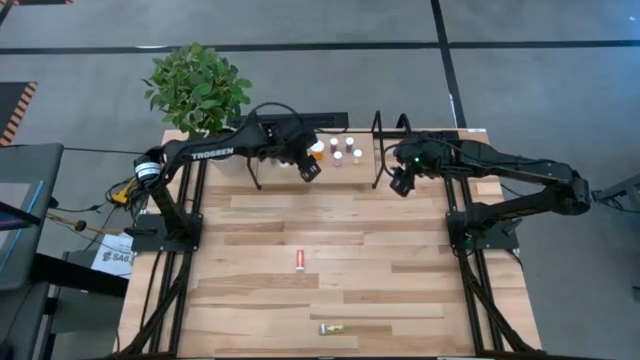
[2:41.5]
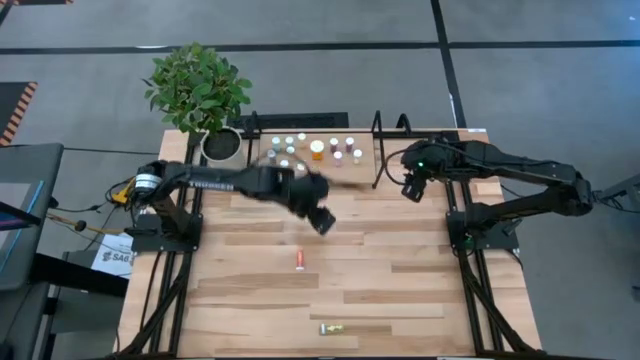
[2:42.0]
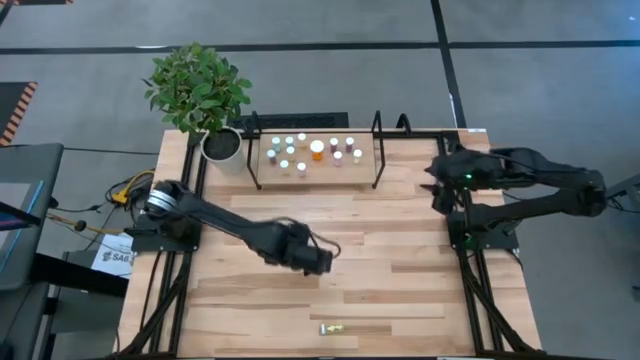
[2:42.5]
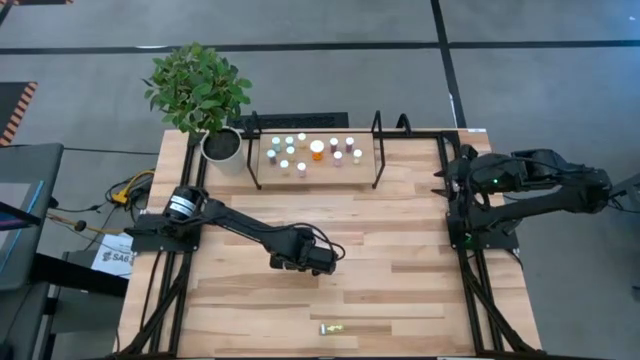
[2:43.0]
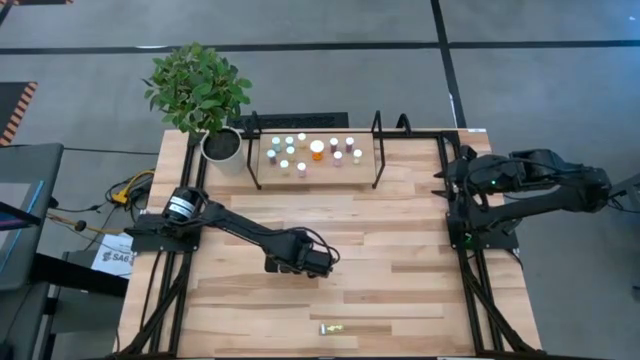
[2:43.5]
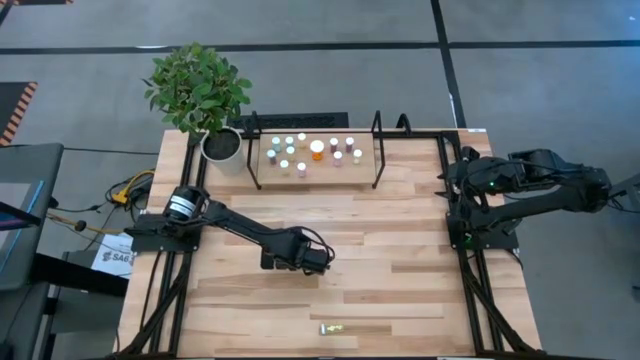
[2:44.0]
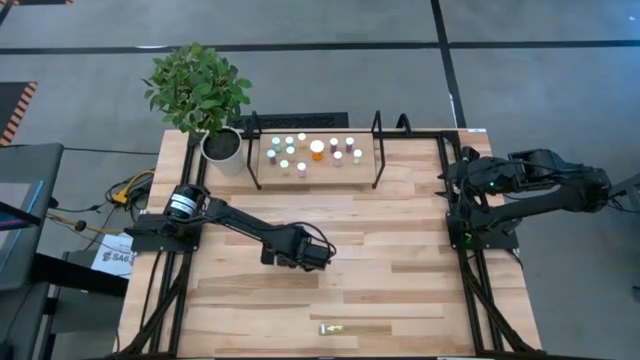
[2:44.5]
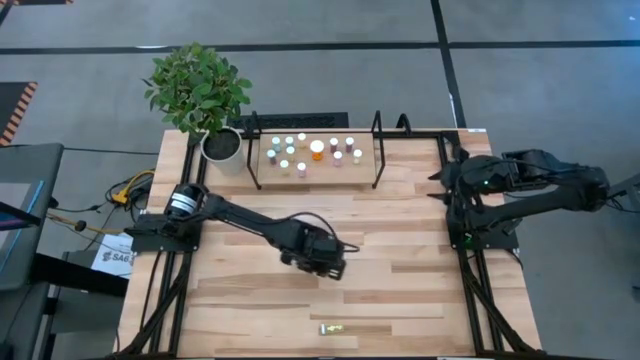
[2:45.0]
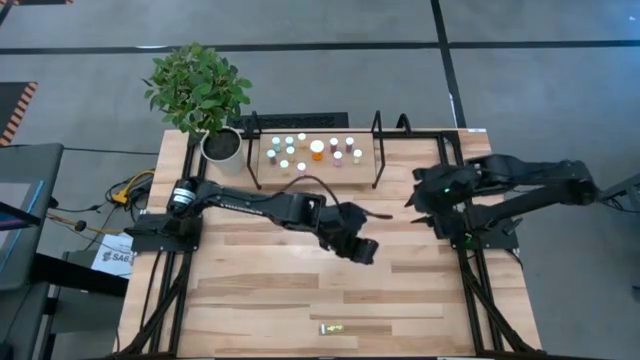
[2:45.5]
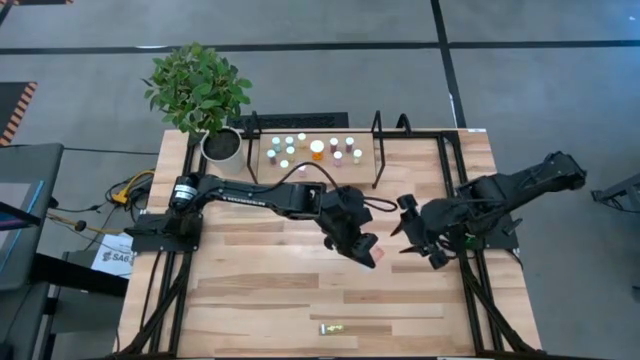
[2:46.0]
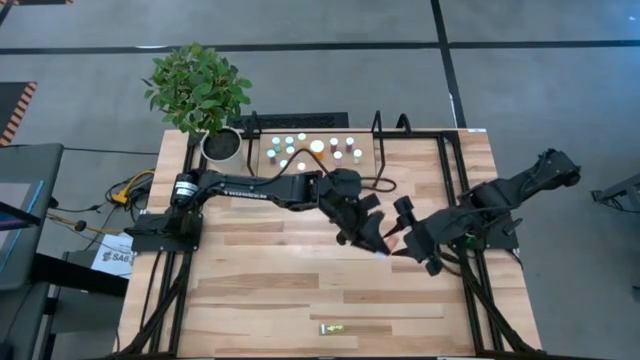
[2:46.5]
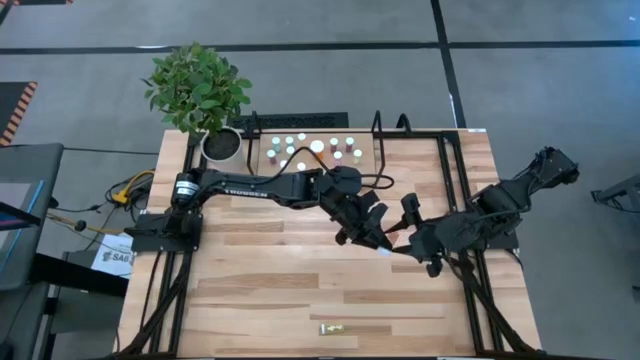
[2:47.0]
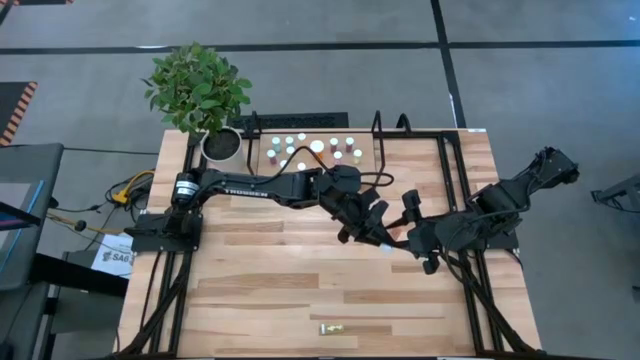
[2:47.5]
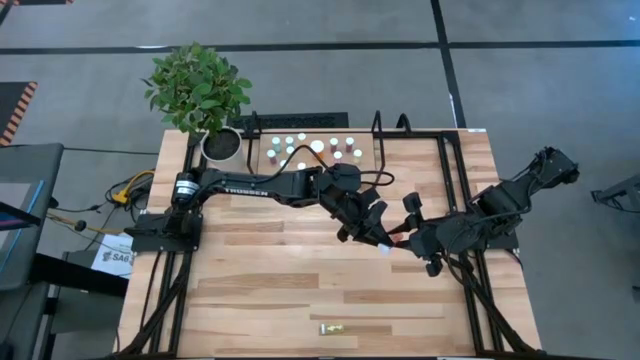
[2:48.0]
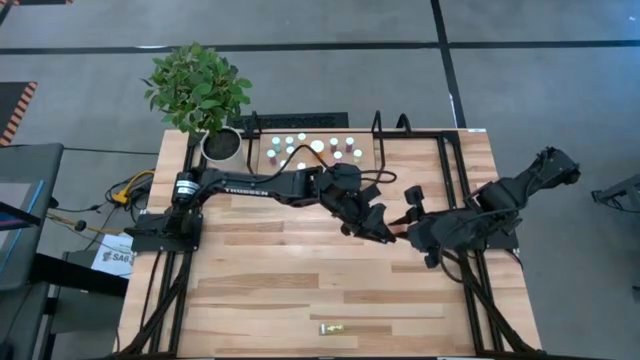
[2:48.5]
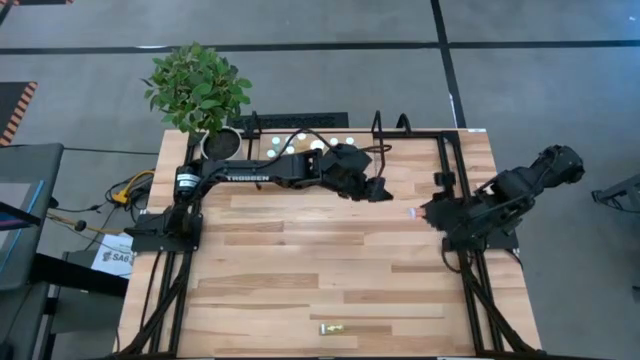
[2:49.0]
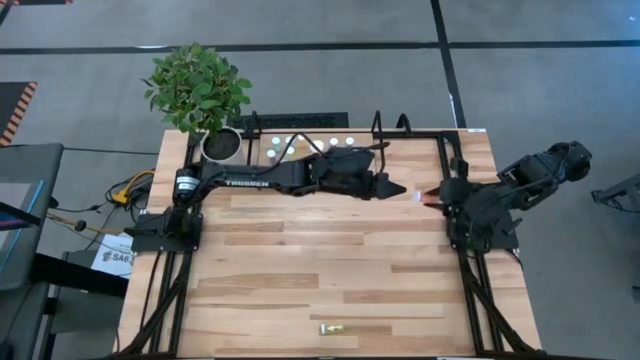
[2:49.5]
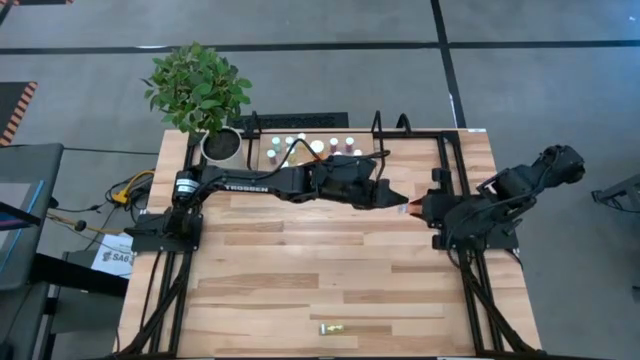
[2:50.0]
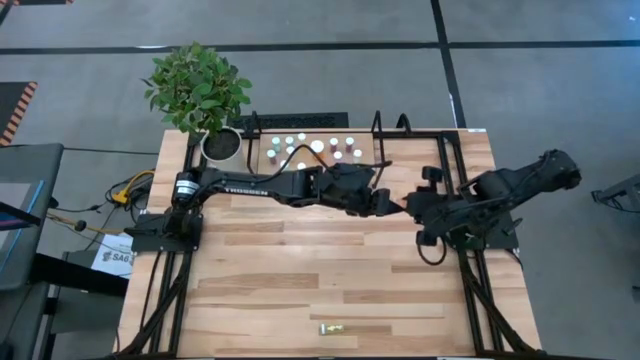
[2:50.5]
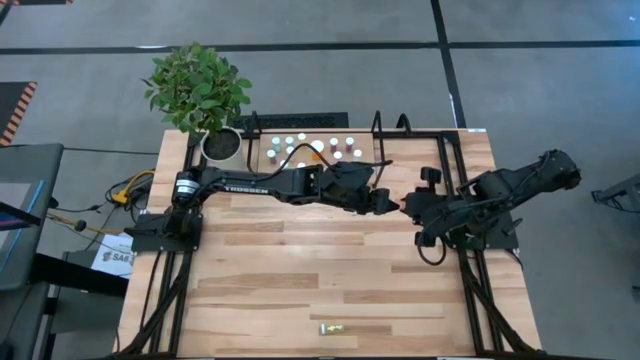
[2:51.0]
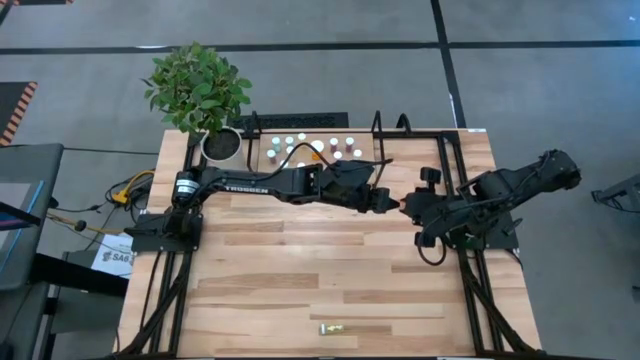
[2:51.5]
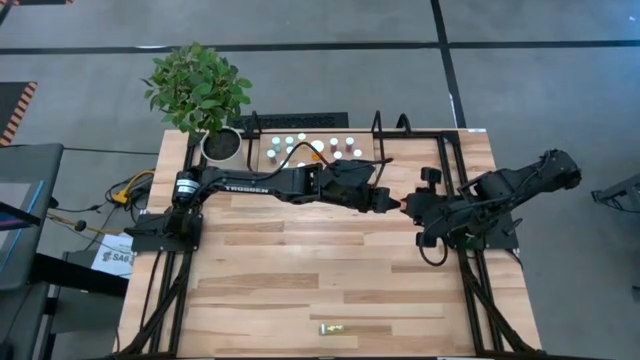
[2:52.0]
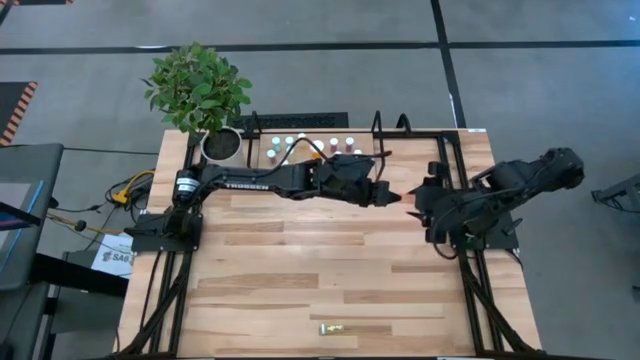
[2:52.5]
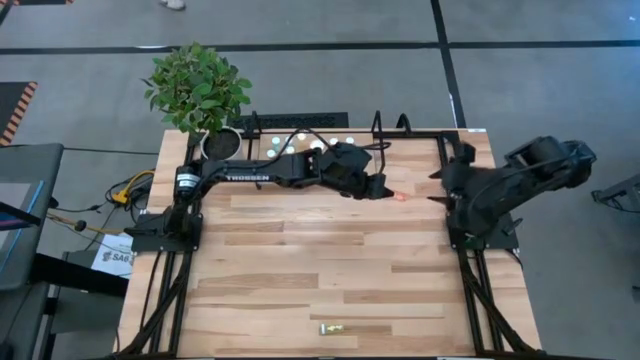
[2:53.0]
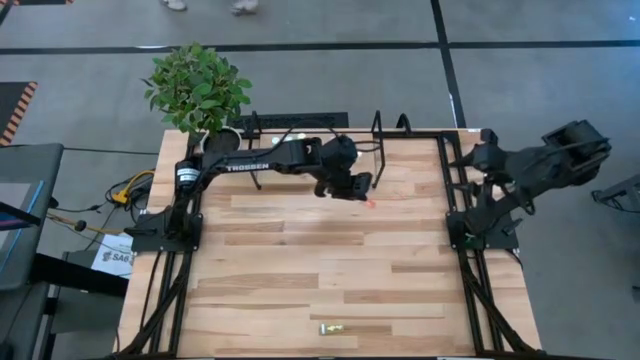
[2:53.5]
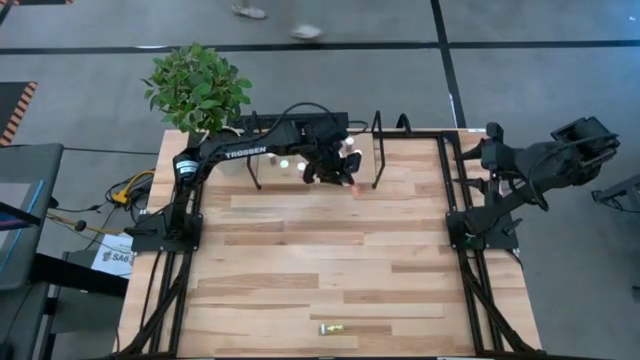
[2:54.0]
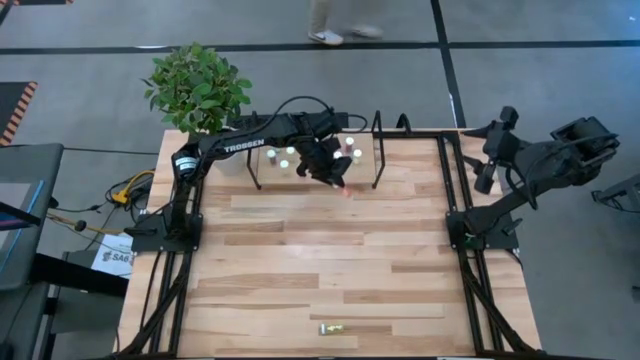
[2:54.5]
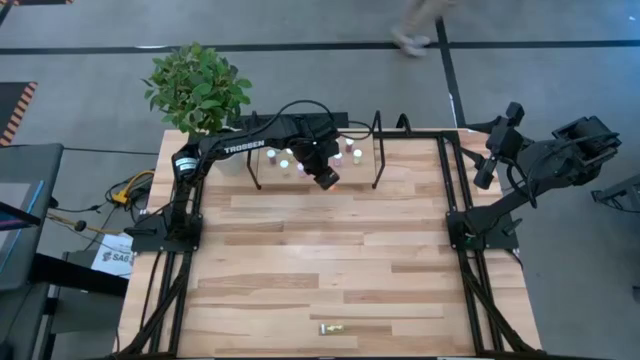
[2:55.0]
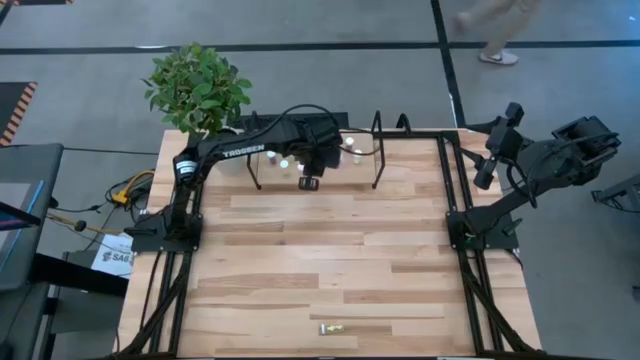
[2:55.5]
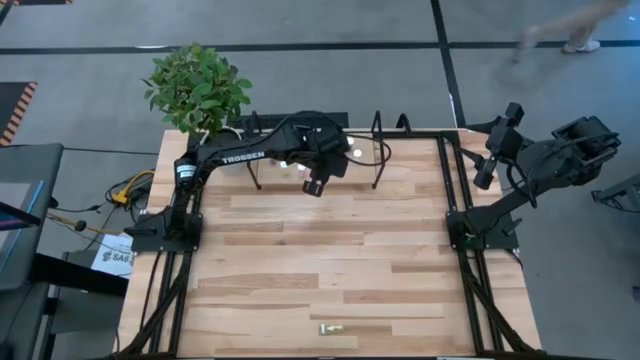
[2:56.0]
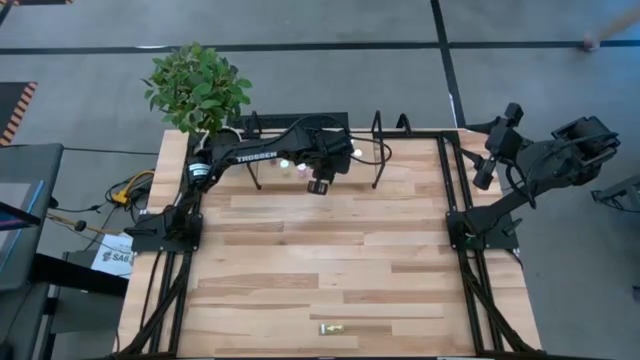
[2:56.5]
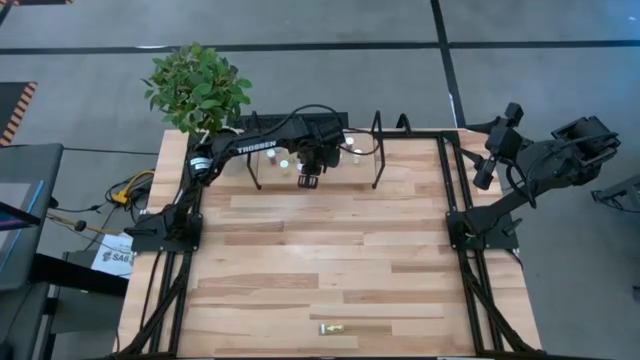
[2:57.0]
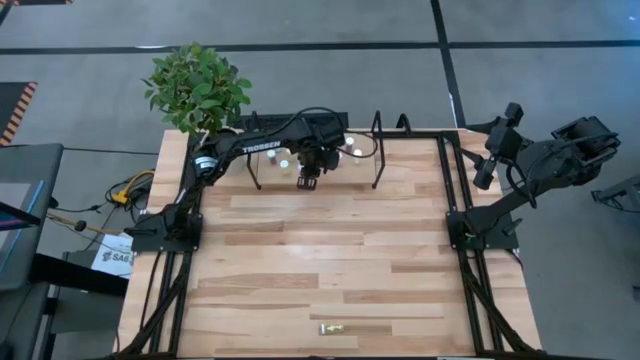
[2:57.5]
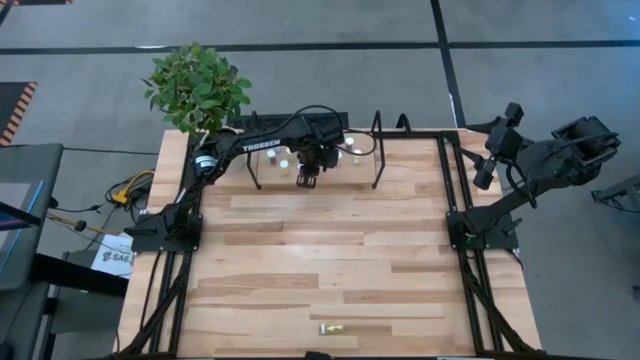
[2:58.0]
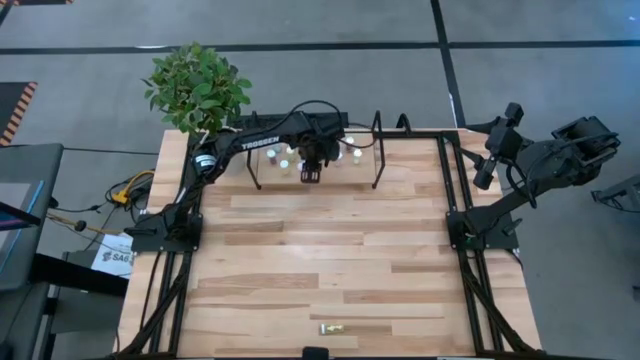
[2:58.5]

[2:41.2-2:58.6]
Task: Pick and place medicine bottles onto shelf by color
Put the orange pill bottle on the shelf

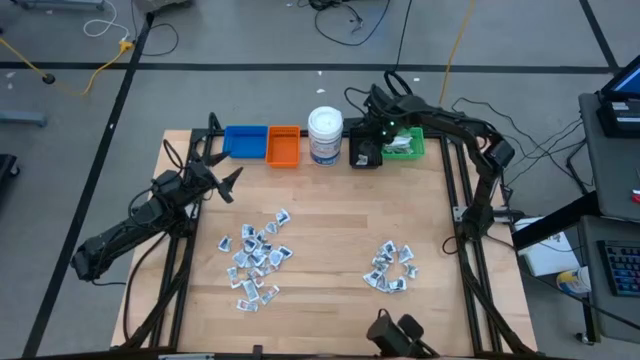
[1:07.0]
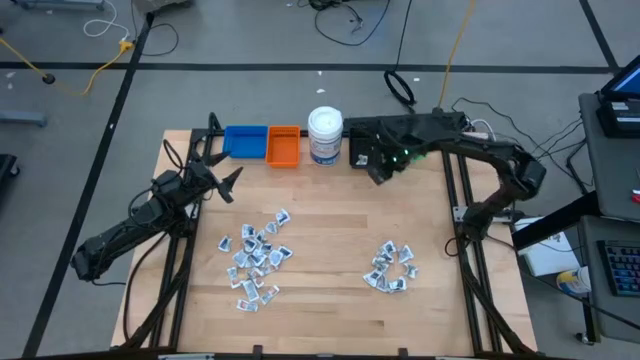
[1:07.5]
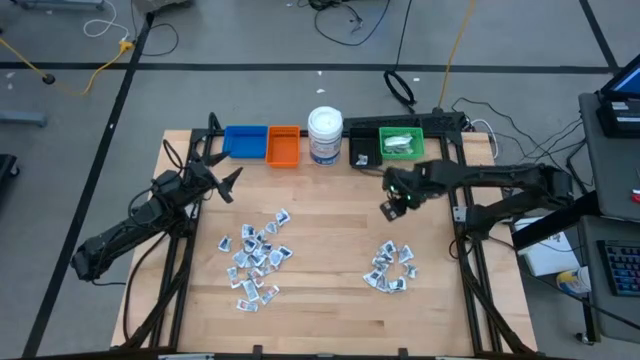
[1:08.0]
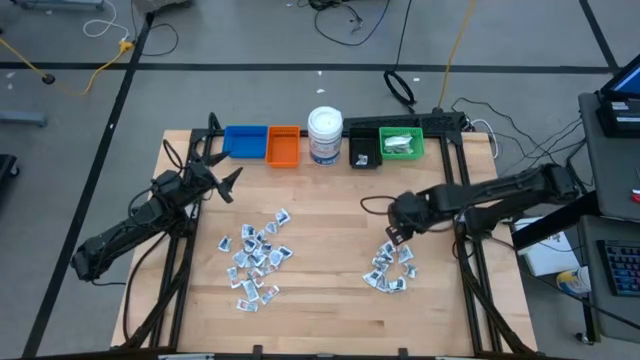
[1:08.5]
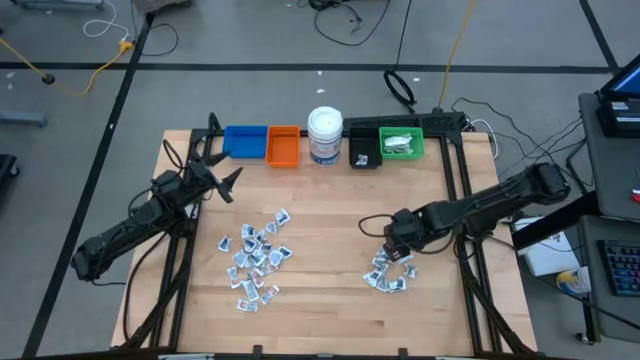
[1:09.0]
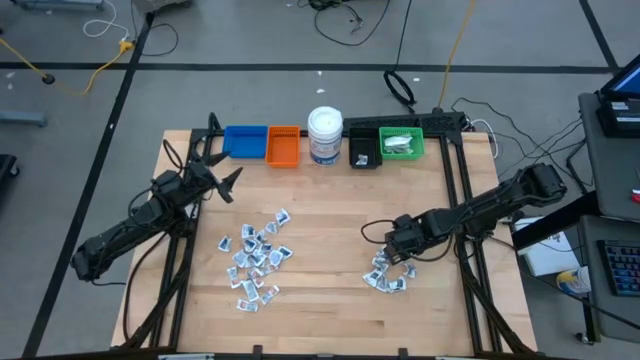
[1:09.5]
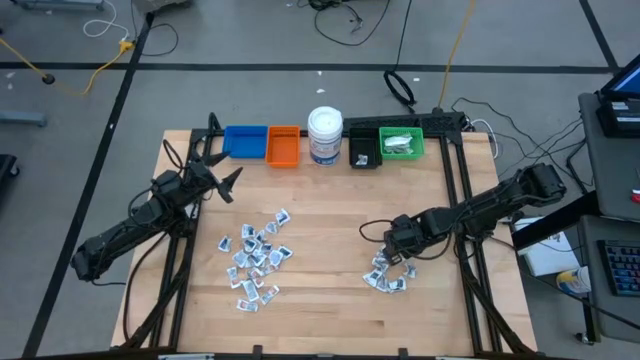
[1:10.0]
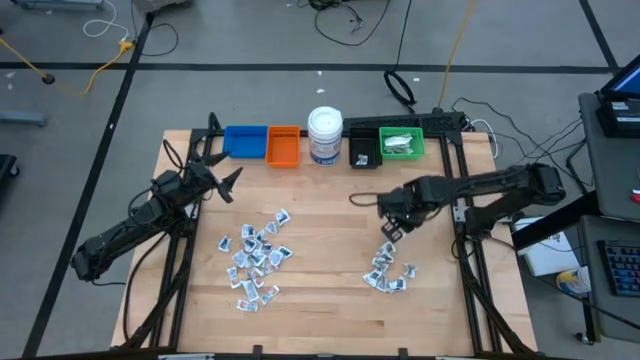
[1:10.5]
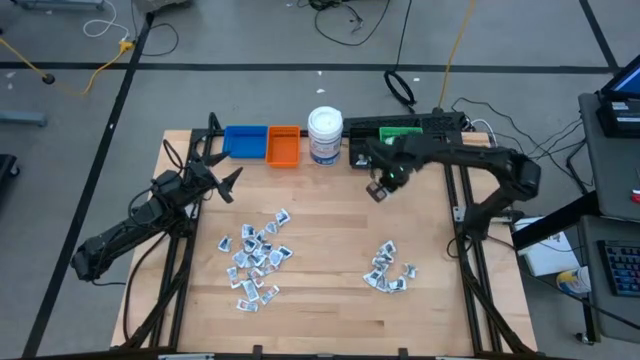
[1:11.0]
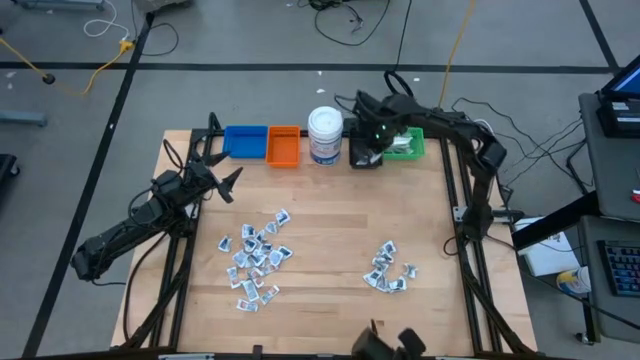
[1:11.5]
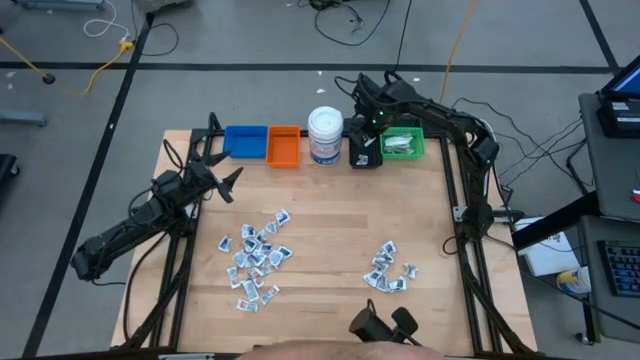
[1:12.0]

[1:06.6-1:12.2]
Task: Pick & Place First Aid Supplies
Put the towelette pack into the black bin
